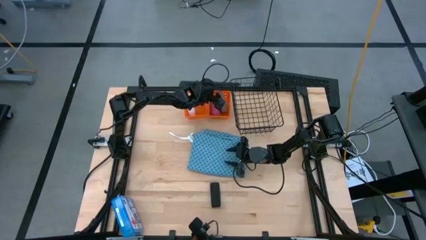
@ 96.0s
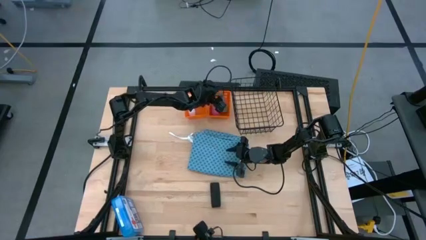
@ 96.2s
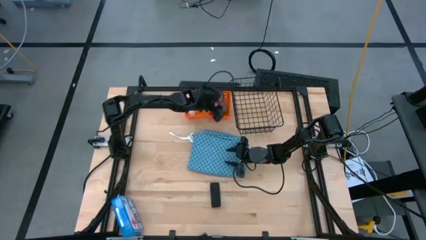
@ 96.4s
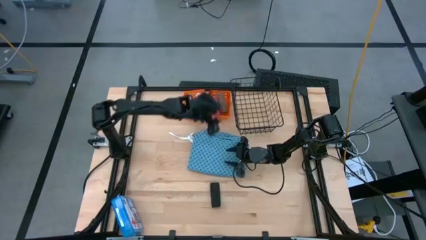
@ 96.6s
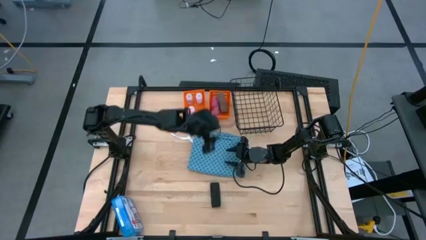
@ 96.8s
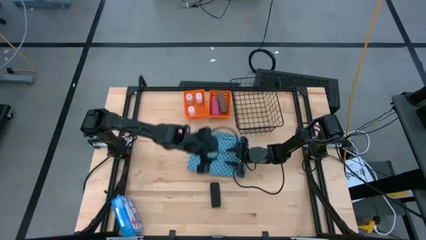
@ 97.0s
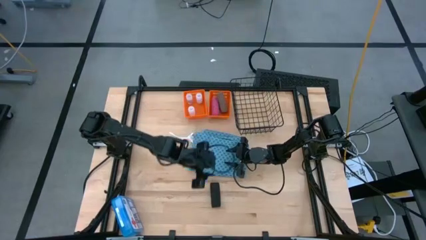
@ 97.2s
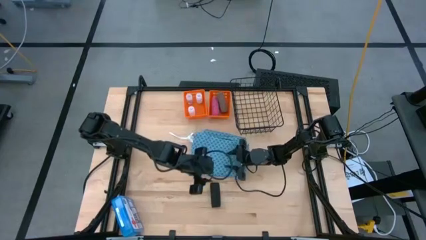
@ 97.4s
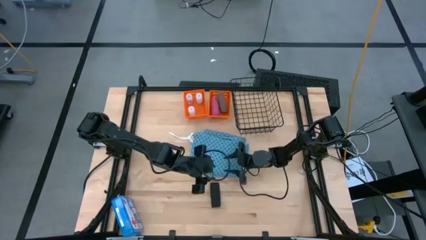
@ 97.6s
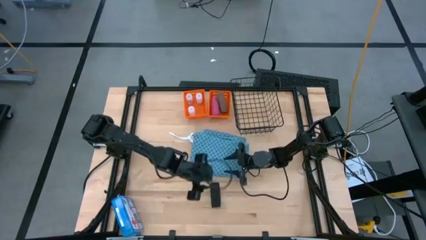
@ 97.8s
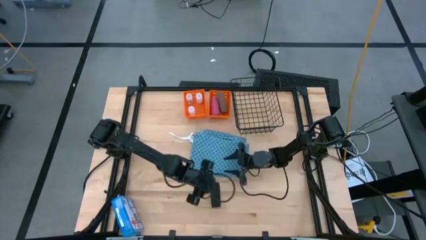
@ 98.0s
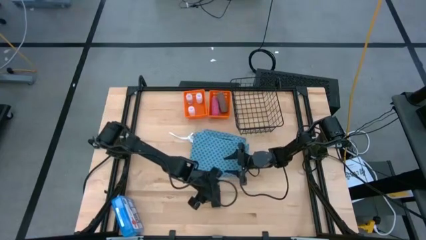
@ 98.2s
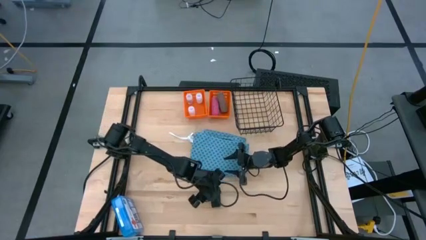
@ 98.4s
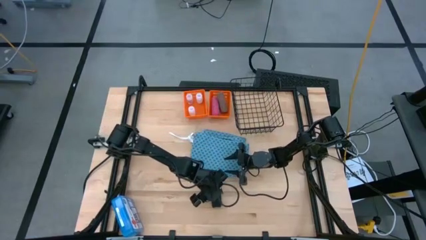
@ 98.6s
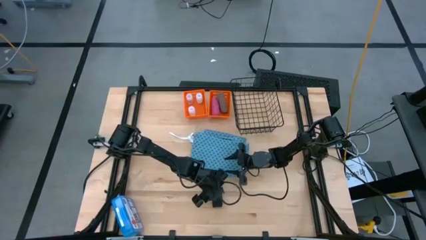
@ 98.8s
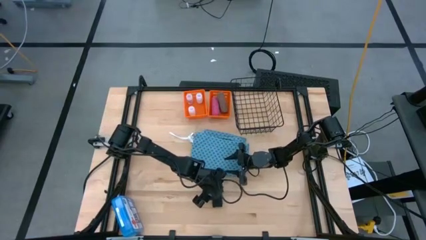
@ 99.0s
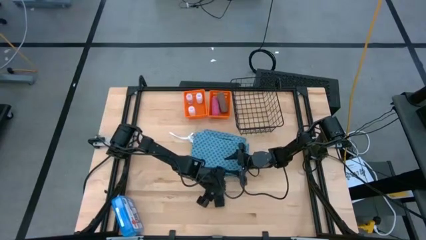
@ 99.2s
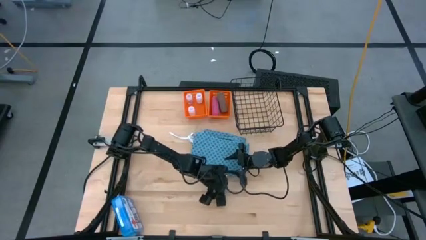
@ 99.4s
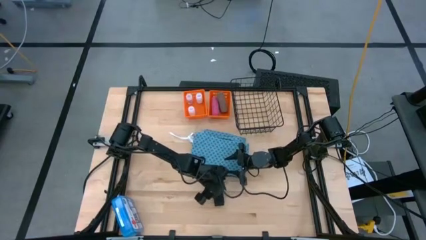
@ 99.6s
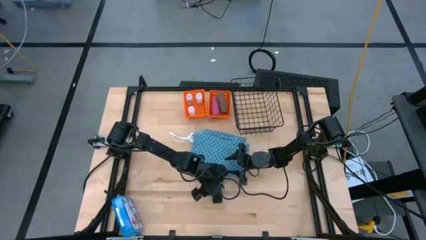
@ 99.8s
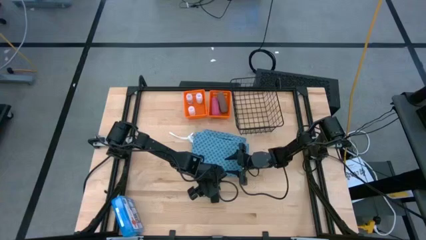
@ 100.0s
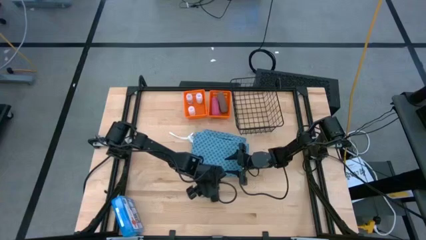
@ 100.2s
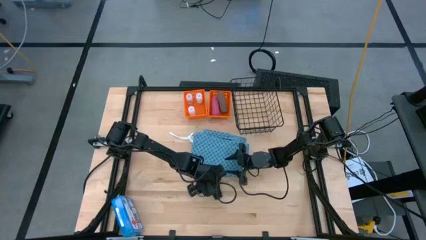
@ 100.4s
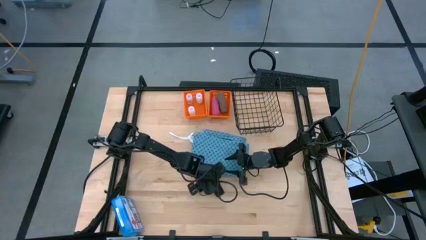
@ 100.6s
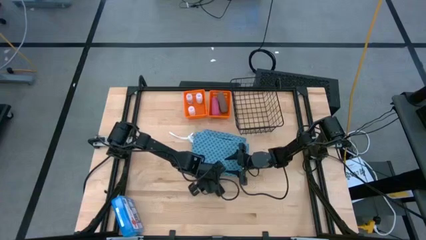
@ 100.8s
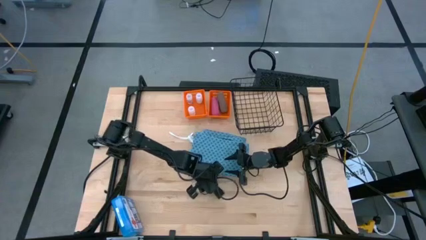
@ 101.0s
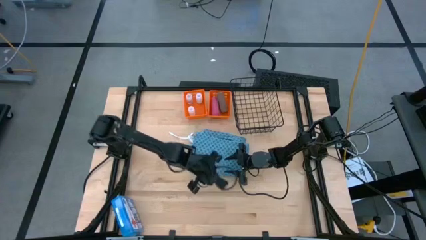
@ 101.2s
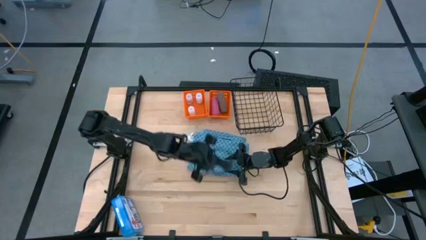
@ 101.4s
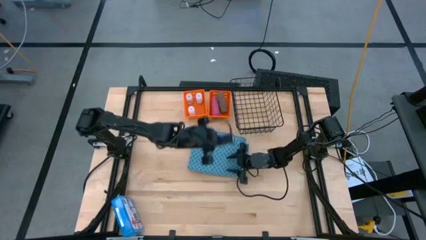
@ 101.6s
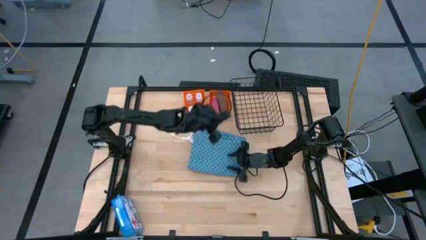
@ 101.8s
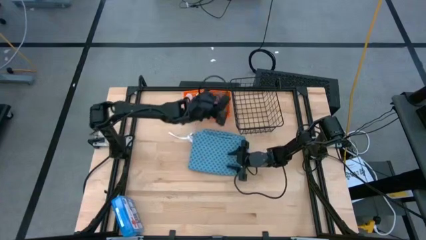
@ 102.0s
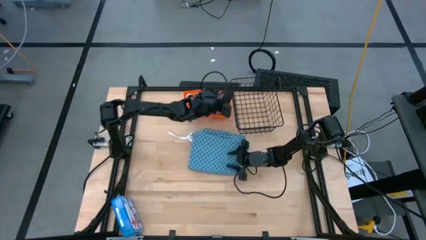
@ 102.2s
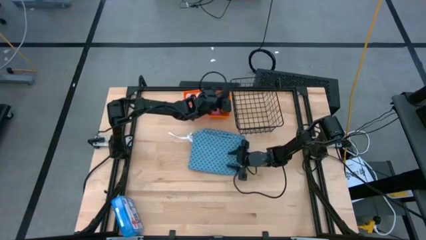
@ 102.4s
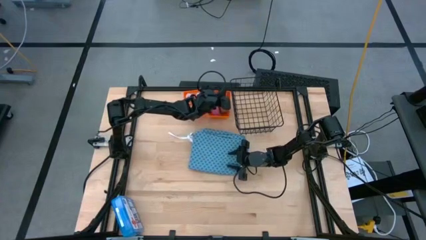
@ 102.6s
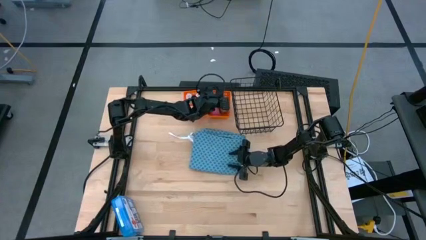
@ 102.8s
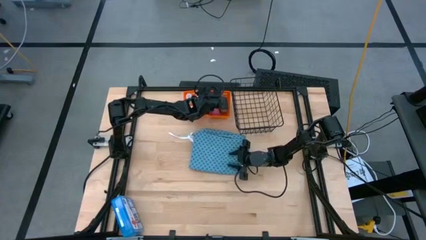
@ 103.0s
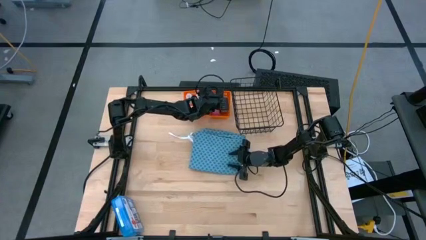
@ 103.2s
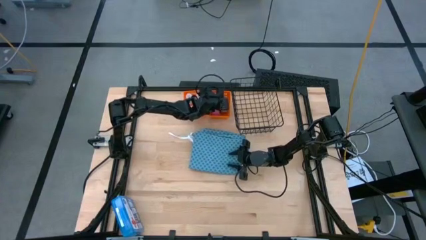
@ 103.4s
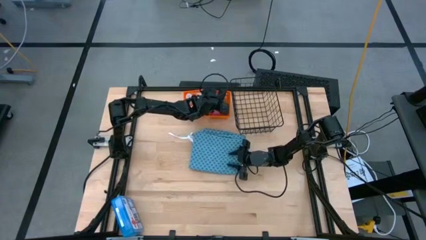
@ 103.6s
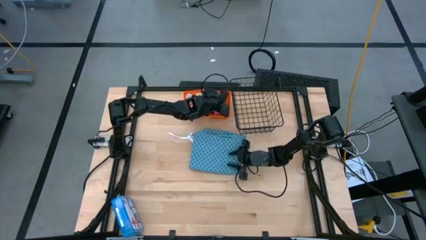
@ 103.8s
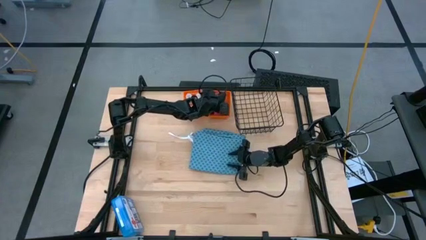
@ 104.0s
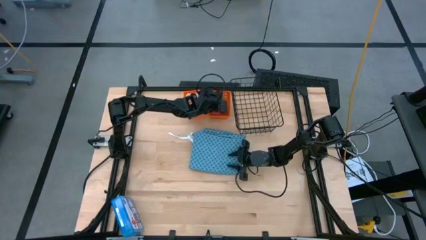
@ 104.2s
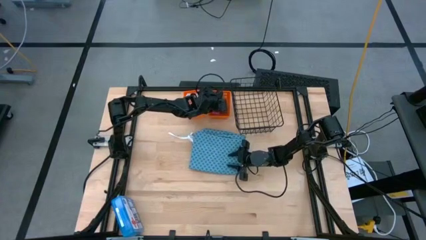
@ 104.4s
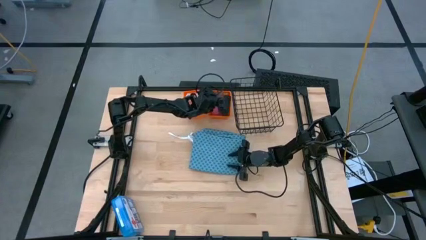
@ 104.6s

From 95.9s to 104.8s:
Task: Pick & Place Medicine items
Put the black bandage into the right orange basket

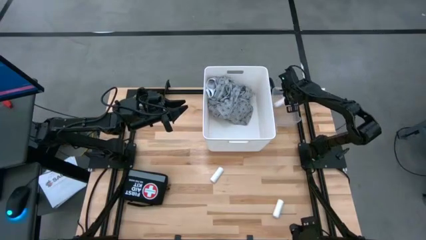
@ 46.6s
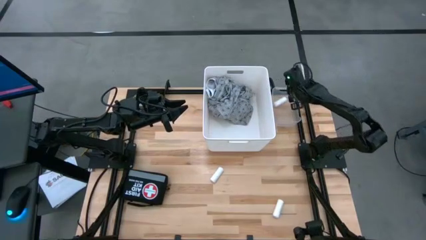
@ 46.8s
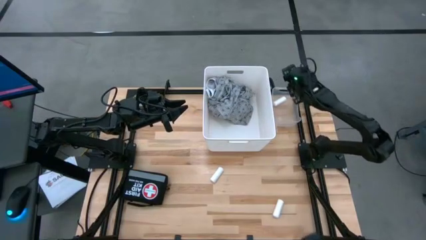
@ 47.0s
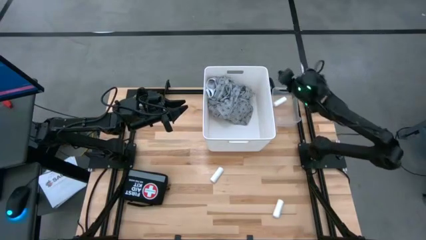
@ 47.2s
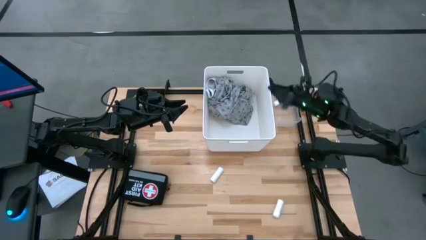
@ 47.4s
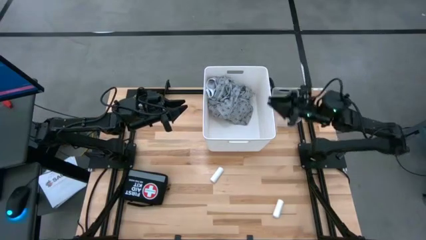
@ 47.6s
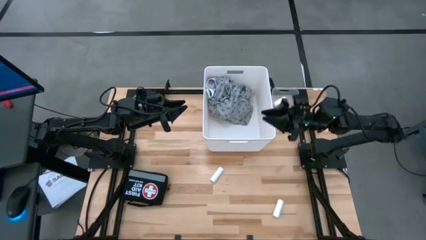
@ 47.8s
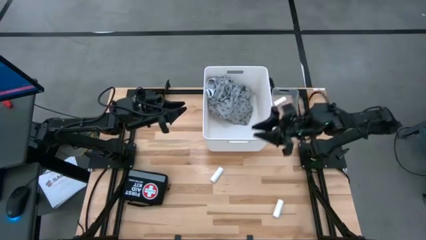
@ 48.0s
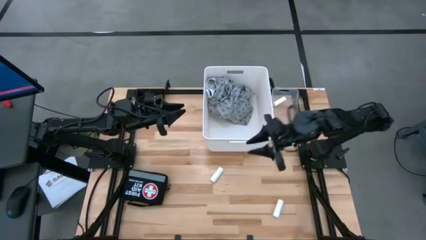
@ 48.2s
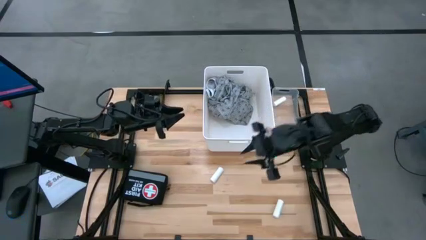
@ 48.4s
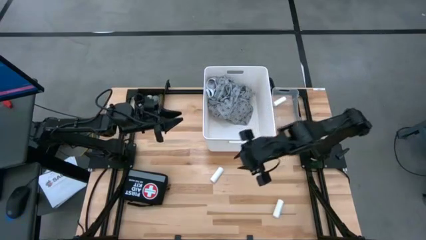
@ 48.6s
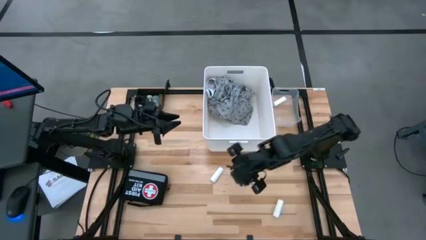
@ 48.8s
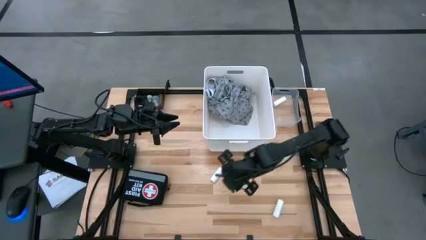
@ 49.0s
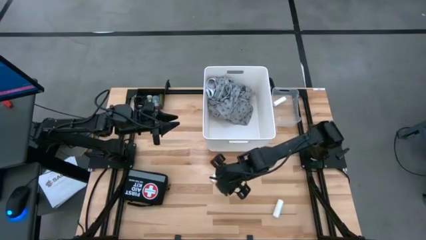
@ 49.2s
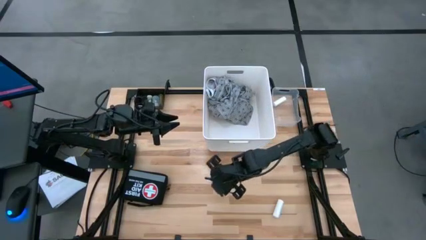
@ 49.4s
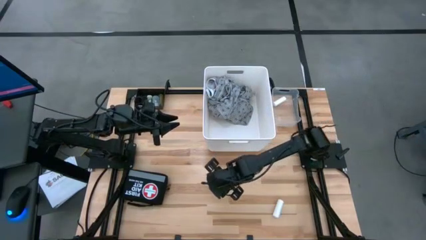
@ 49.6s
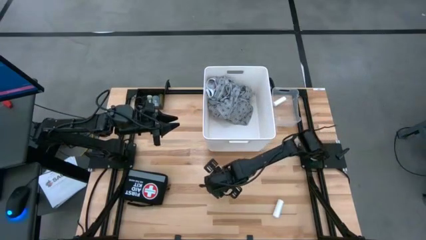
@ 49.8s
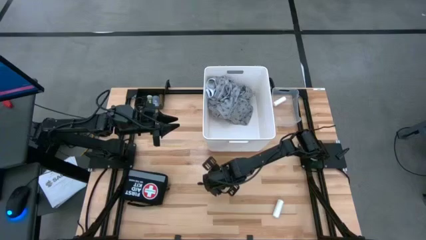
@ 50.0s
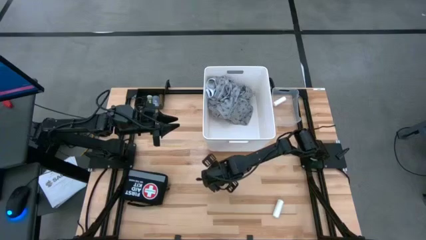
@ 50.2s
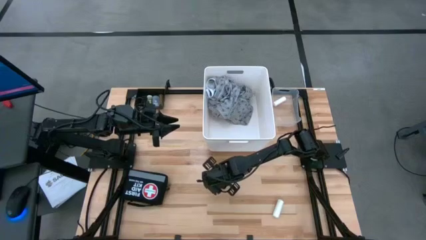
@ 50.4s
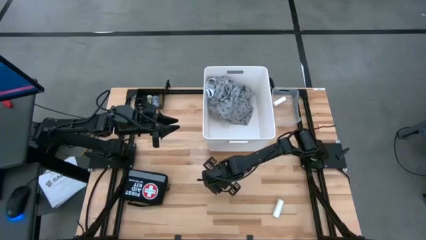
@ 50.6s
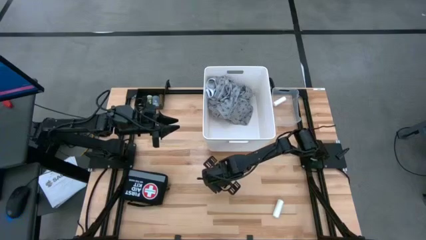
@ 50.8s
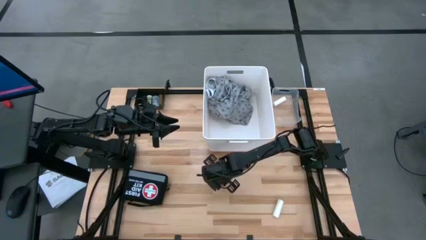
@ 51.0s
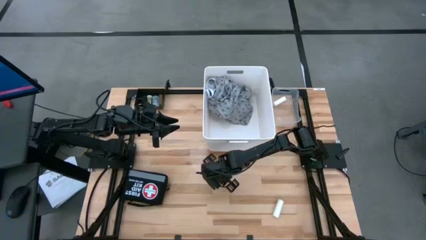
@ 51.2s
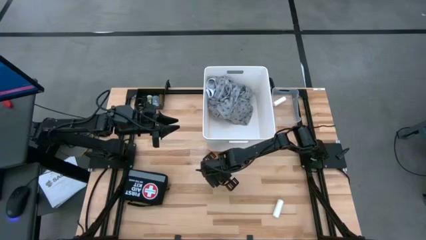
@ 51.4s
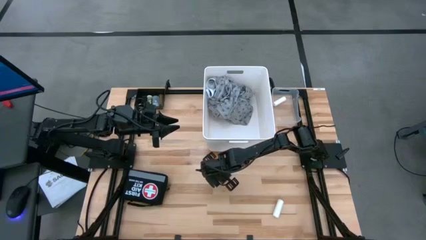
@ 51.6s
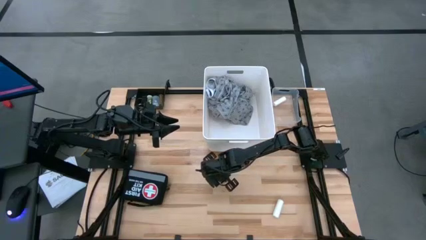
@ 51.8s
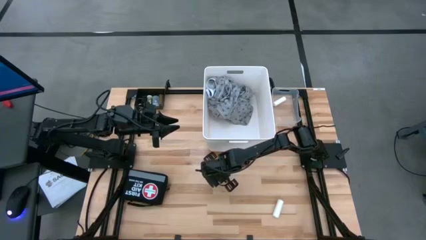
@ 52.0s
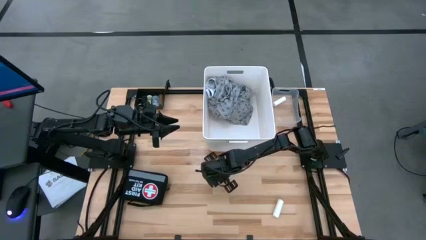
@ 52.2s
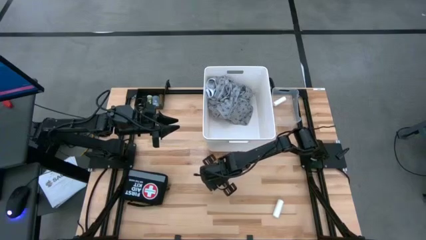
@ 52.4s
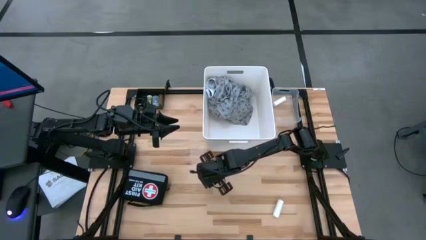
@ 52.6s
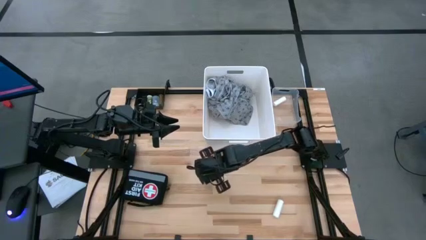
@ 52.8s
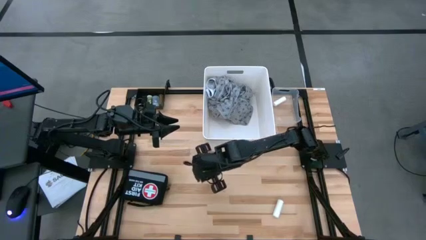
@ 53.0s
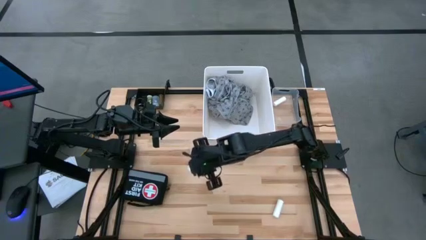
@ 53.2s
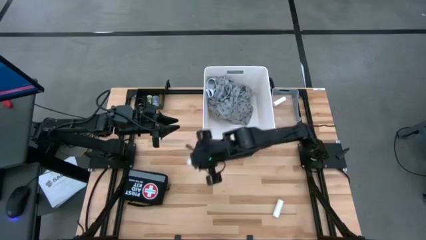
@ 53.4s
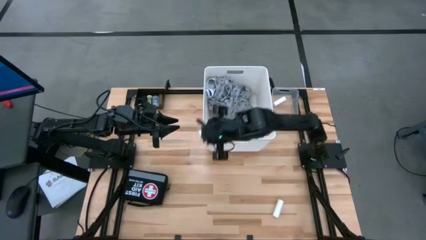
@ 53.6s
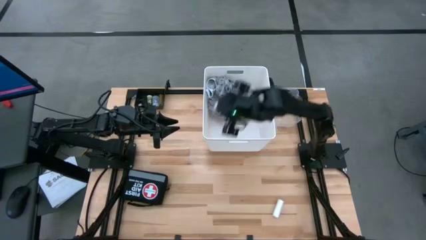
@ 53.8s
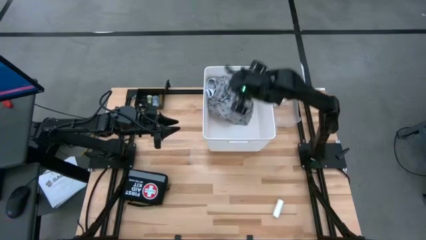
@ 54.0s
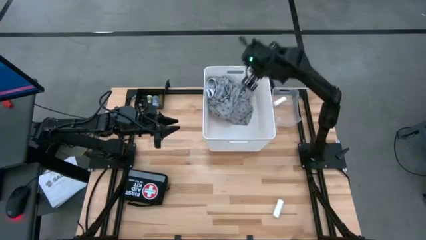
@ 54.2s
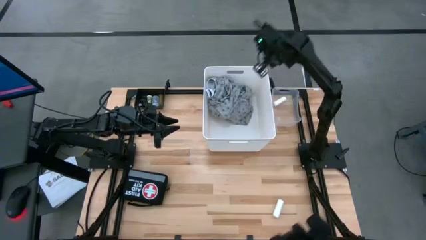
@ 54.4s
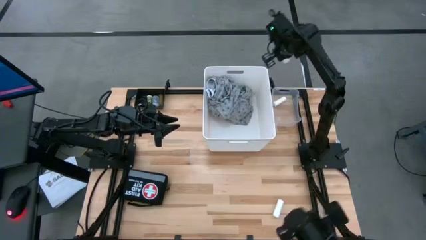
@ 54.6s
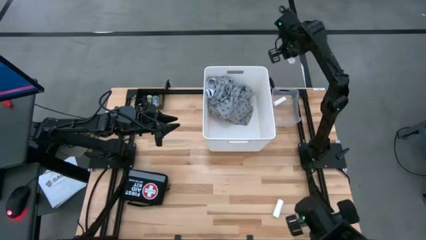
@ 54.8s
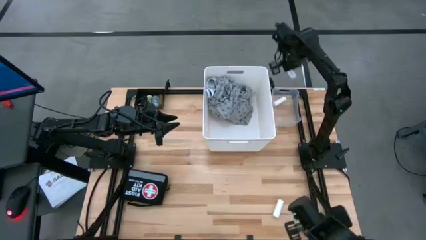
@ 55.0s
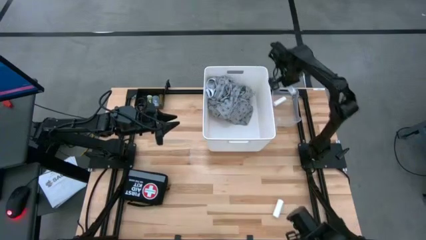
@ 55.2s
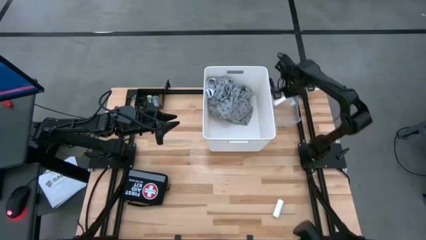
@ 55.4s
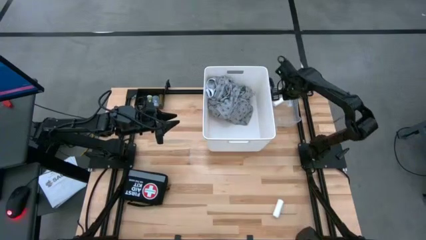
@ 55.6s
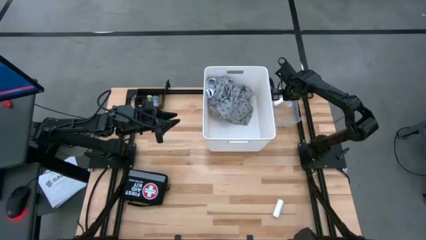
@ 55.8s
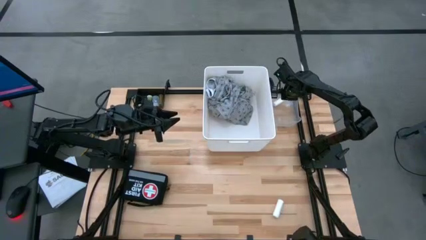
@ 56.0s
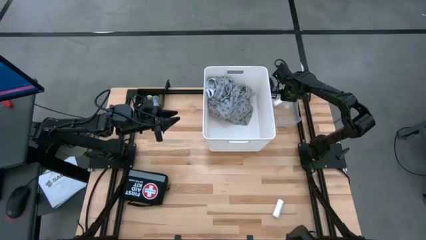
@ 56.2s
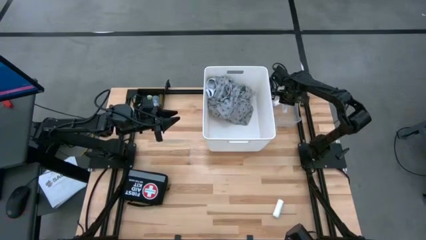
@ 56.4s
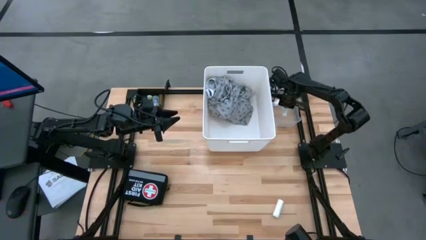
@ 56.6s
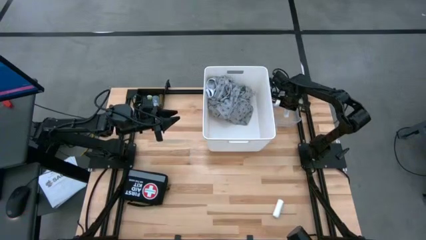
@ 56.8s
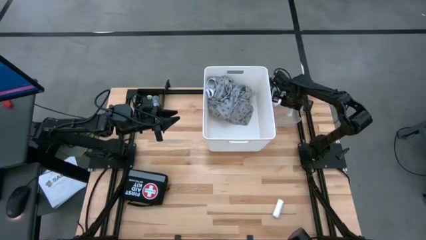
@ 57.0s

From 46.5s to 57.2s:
Task: Pick & place medical supplies in basket/bin
Put the left white gauze in the transparent bin
